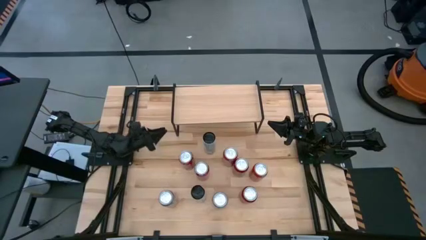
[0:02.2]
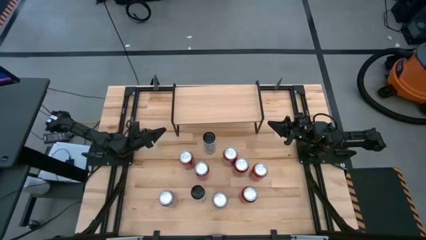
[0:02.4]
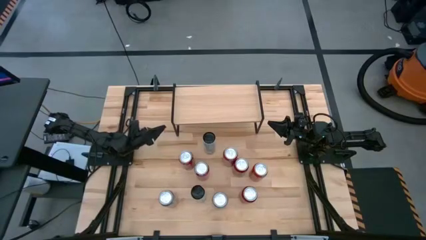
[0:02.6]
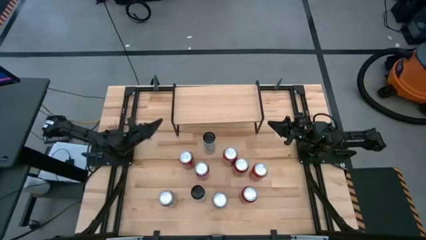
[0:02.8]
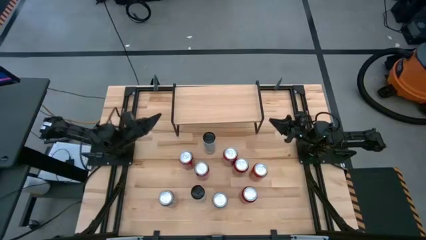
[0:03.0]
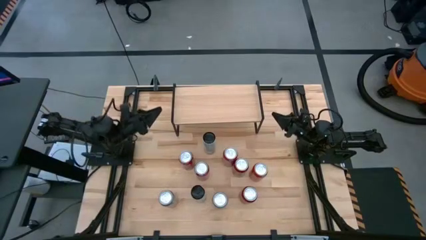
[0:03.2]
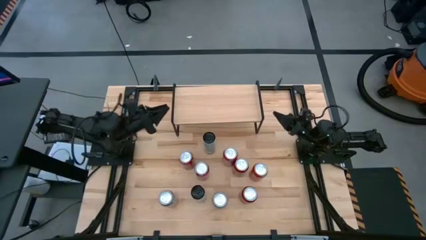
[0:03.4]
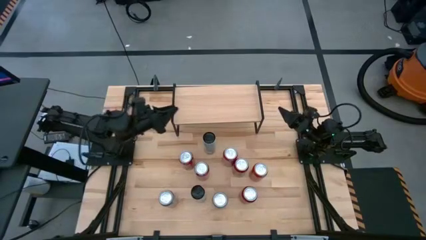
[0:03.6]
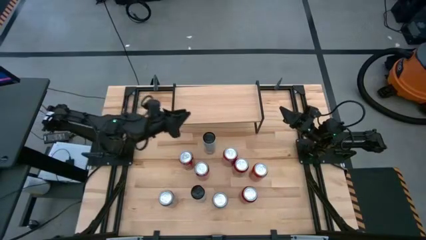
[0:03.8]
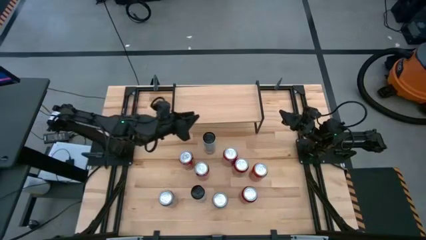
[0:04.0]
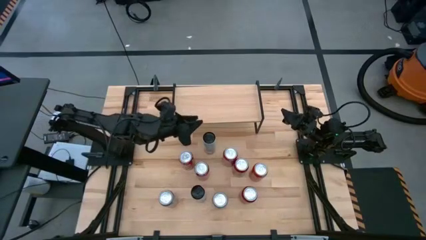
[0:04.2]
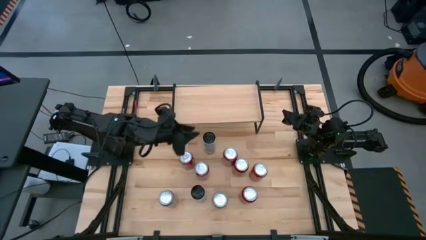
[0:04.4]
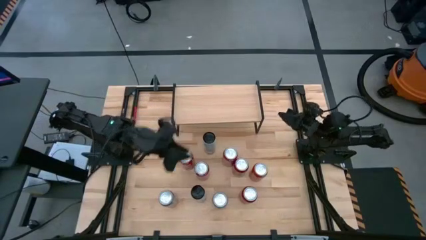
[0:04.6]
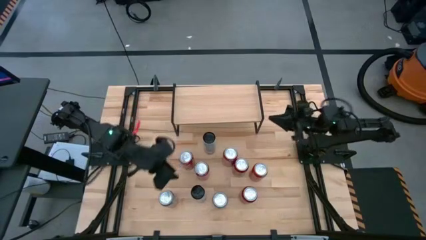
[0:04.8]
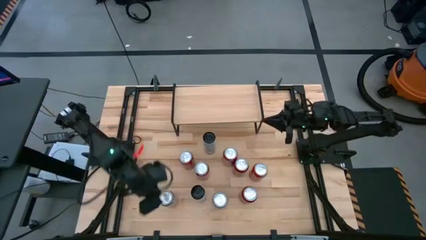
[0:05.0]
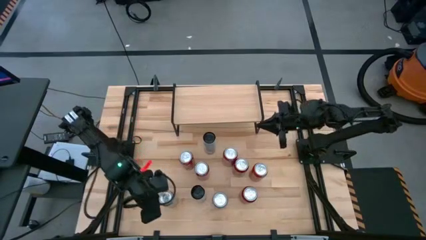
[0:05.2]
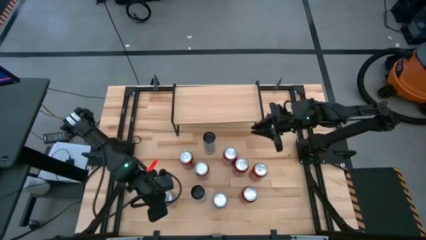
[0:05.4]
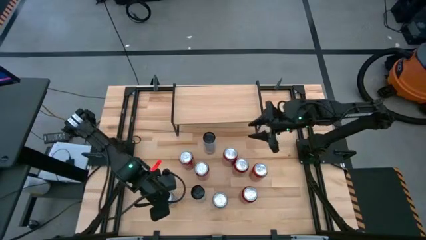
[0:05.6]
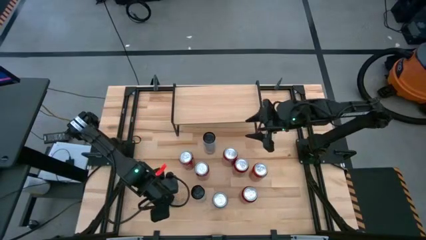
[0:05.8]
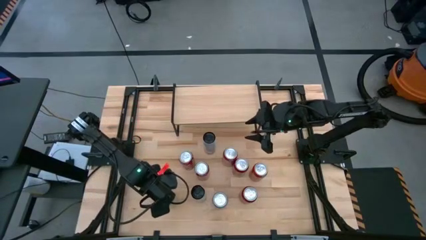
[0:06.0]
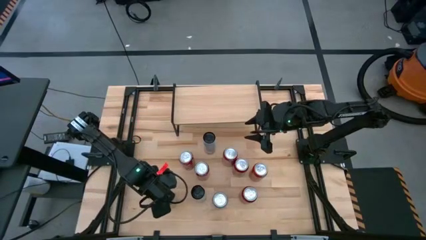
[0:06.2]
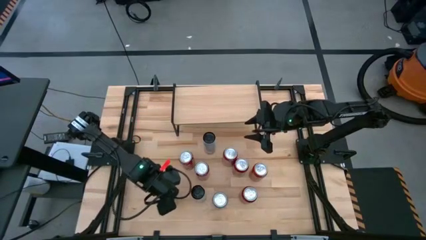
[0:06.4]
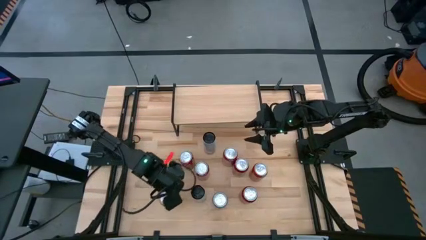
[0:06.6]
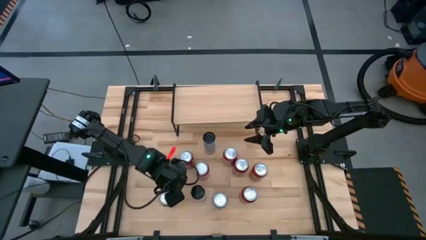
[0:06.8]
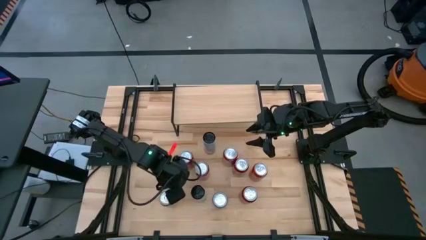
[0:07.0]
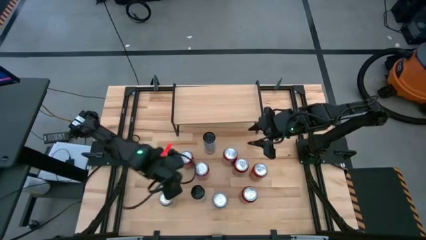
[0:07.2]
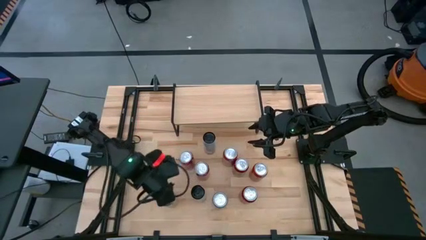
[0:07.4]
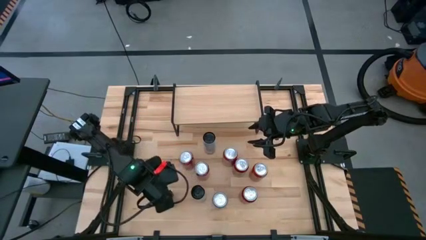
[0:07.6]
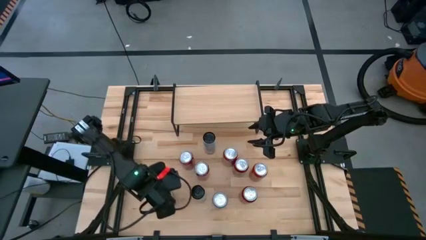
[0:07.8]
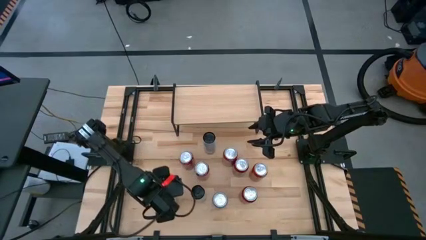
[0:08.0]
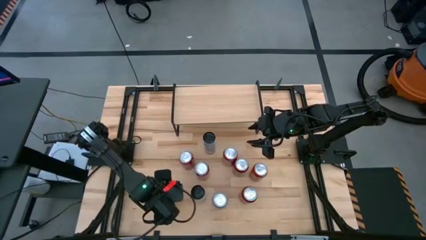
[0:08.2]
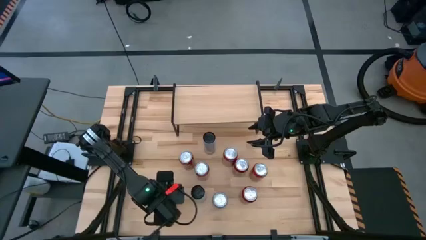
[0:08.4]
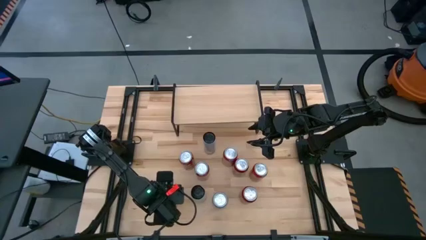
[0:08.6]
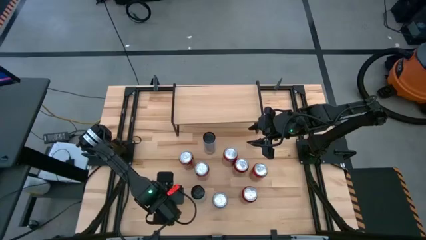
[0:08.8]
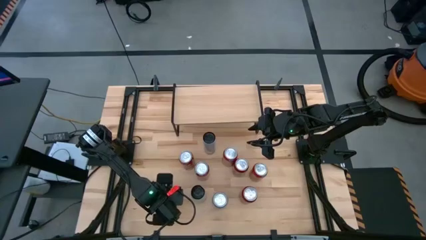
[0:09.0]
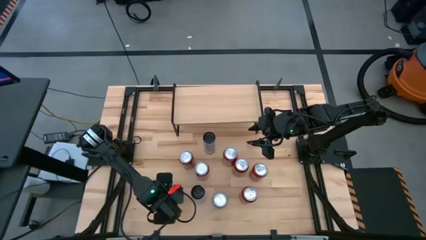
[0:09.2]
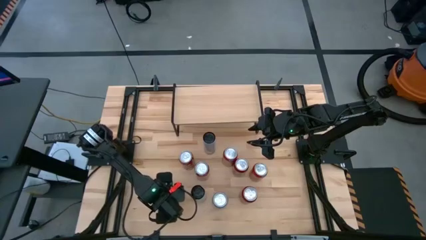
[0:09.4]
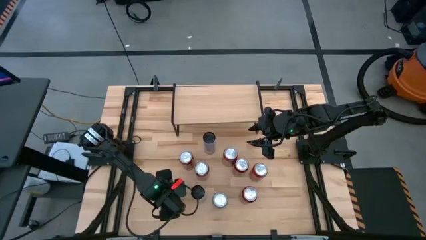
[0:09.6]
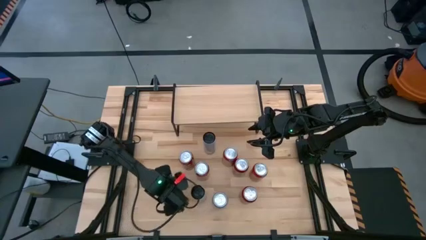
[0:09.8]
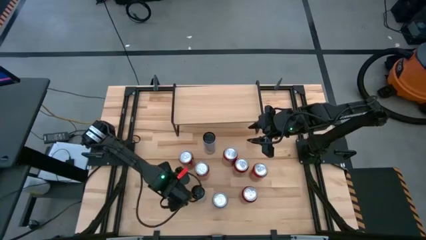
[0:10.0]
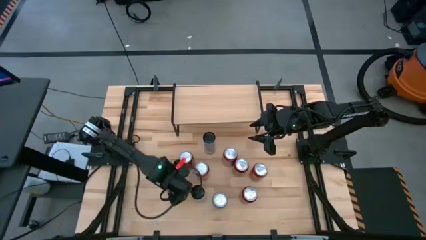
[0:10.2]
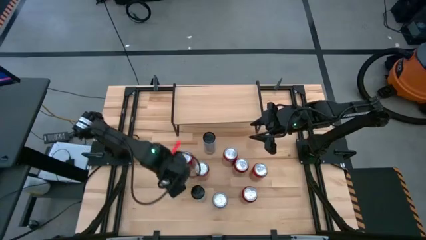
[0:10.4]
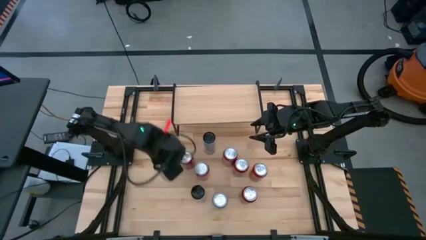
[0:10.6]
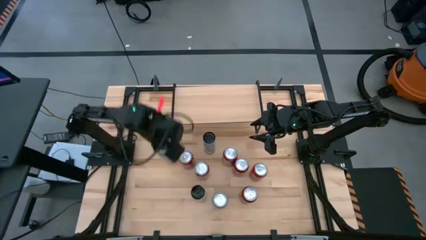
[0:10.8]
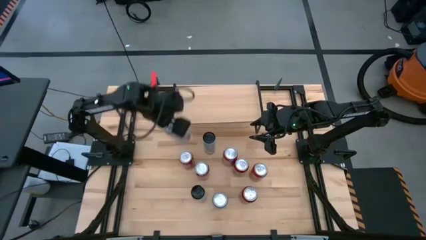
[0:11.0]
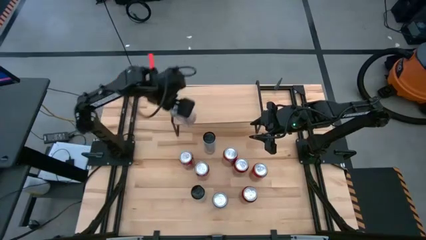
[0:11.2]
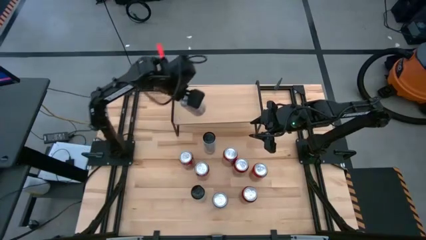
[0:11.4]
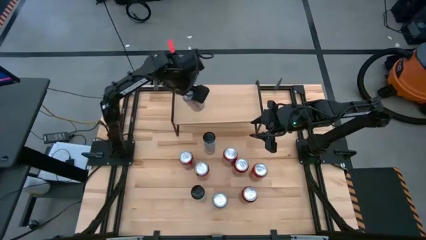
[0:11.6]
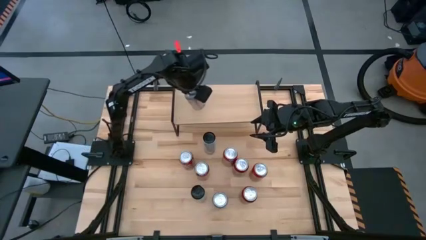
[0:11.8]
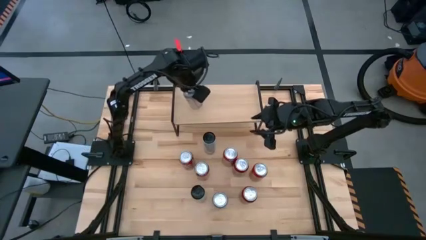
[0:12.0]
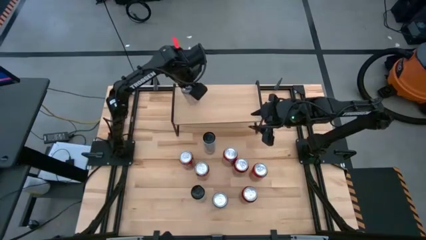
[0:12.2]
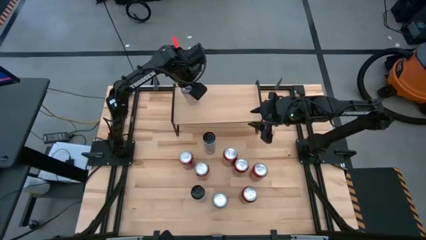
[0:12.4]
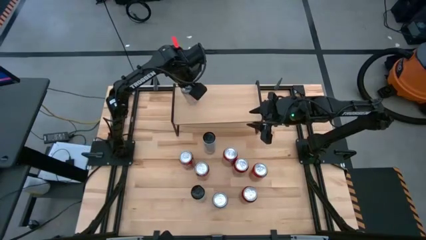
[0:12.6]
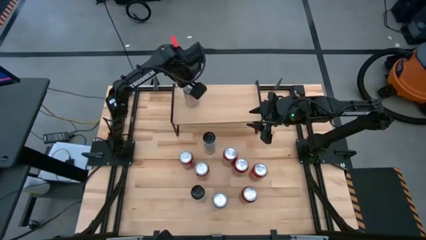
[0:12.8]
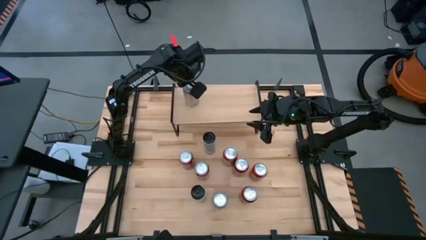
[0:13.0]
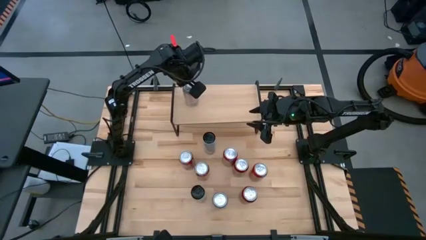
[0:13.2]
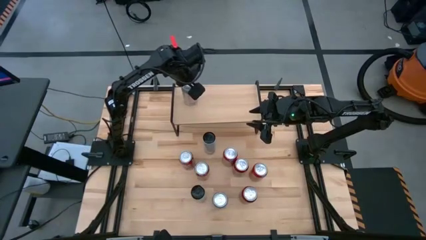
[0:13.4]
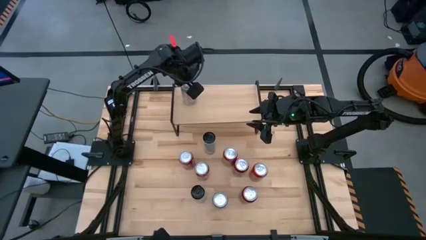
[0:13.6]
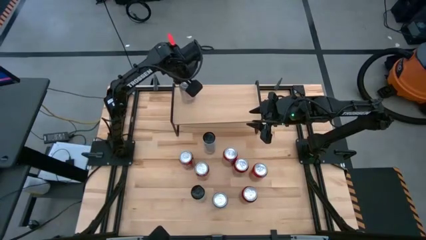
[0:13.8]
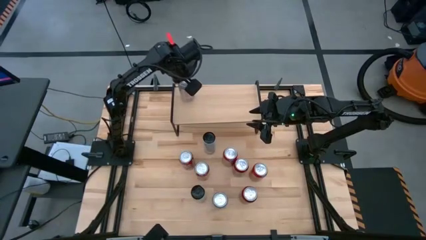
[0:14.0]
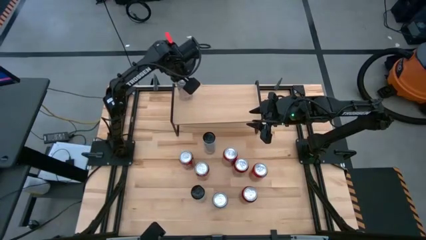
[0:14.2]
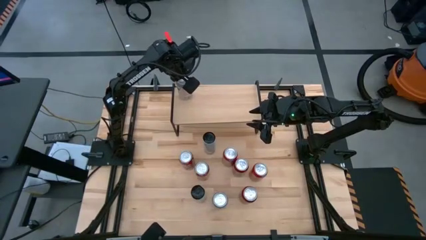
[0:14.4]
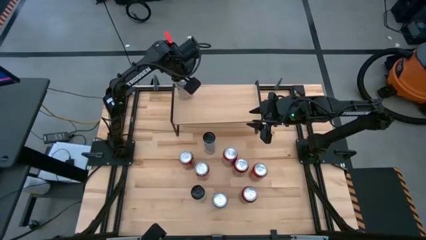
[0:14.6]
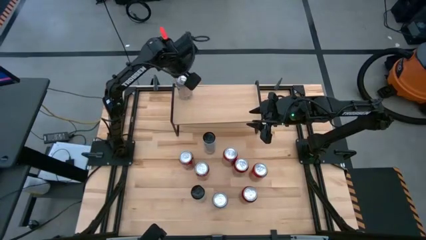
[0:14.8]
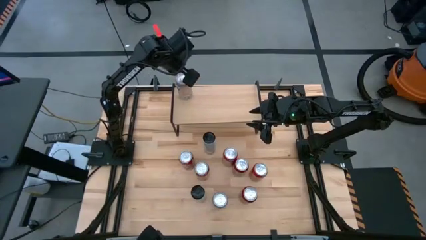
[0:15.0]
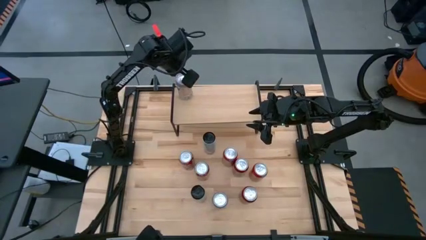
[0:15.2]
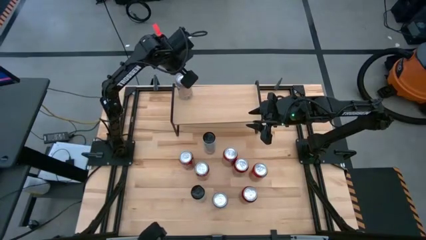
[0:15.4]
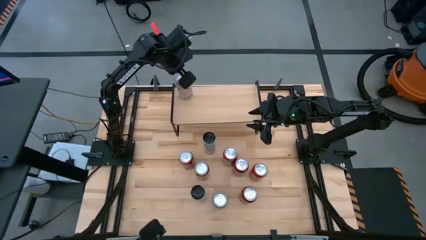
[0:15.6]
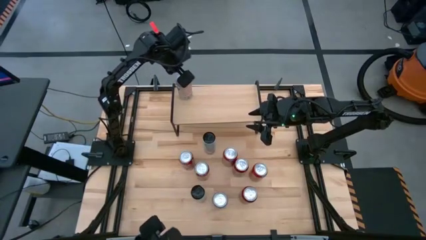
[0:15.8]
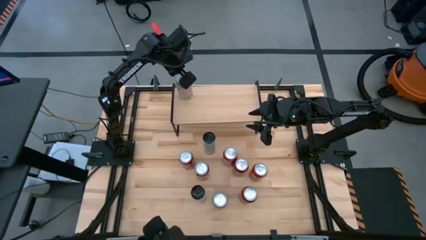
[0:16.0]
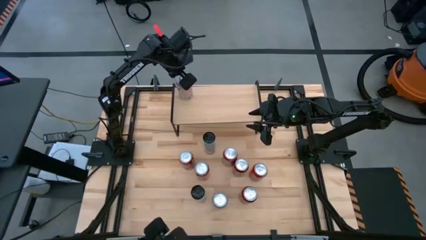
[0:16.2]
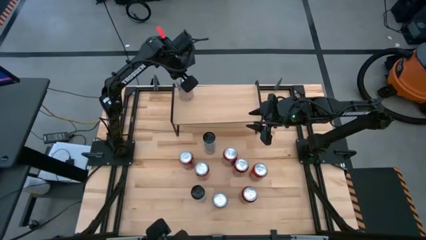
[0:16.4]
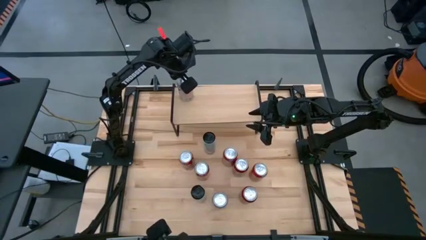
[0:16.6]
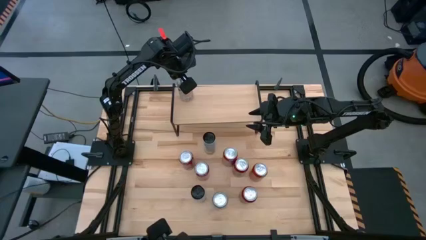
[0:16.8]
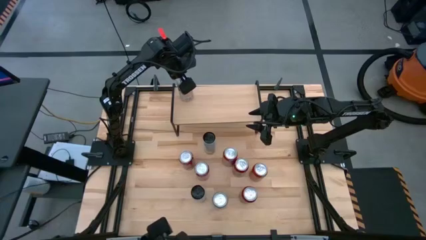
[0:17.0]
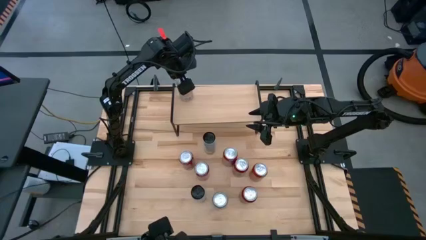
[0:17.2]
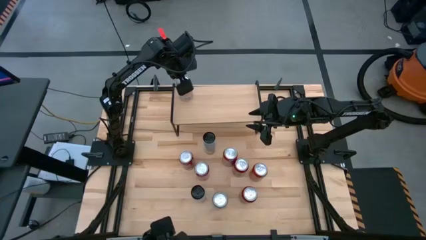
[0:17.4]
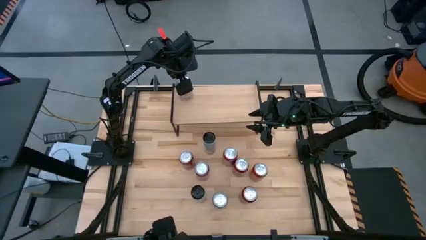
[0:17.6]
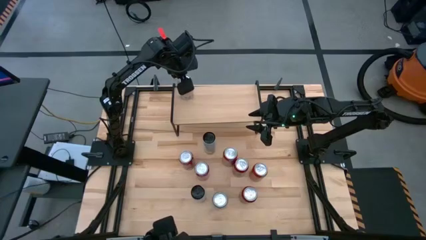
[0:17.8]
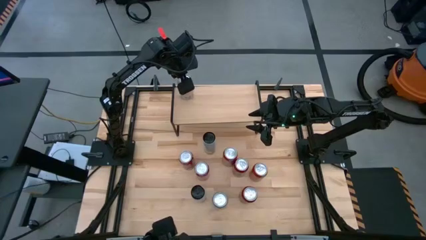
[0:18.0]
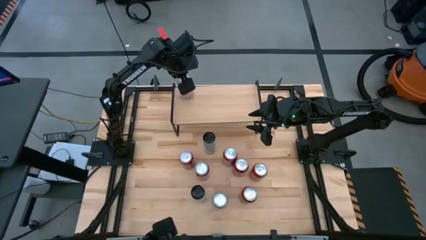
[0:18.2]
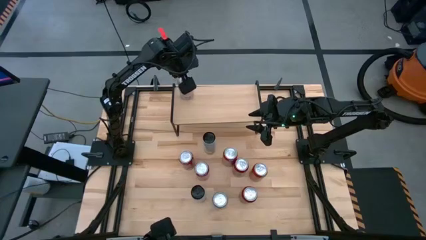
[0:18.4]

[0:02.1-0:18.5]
Task: Place canned beverage on shelf
Put the left silver soda can on the shelf
